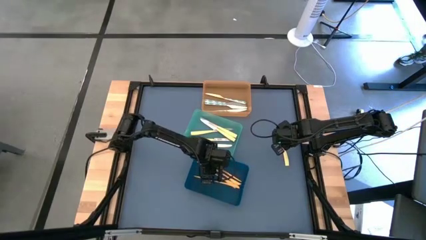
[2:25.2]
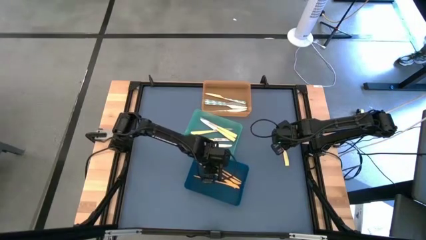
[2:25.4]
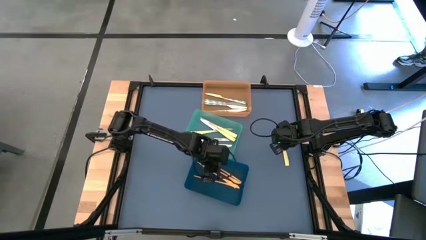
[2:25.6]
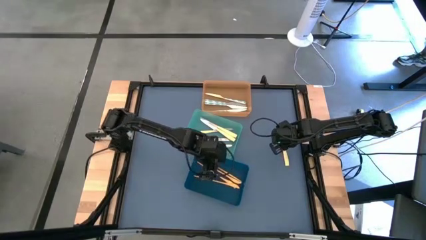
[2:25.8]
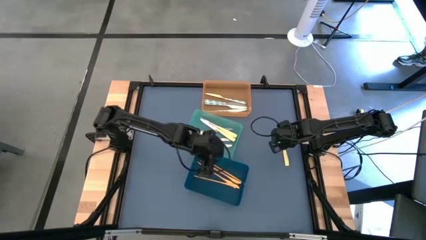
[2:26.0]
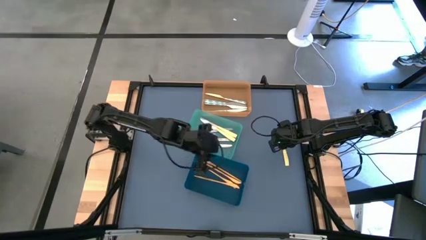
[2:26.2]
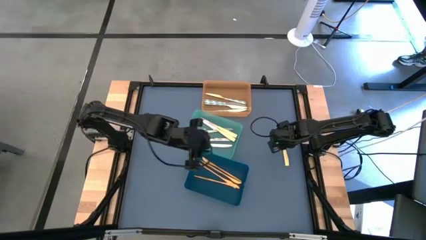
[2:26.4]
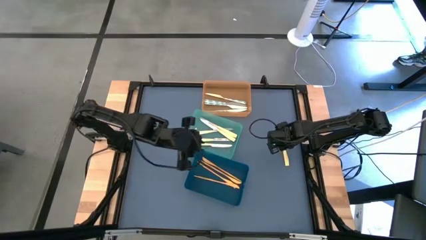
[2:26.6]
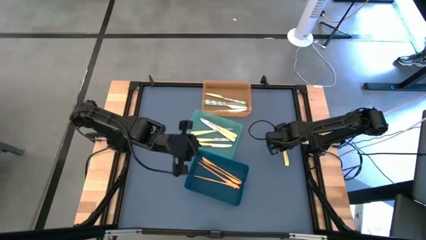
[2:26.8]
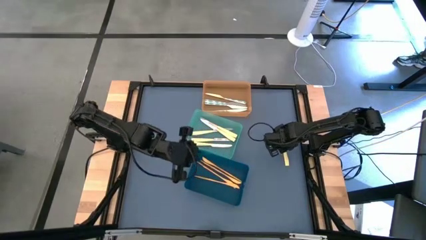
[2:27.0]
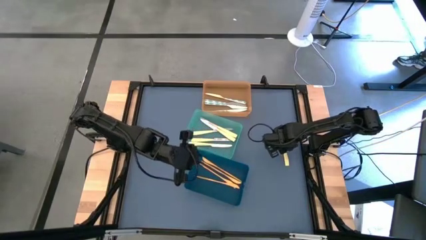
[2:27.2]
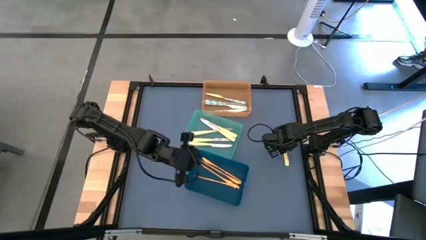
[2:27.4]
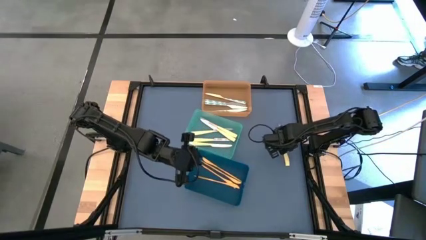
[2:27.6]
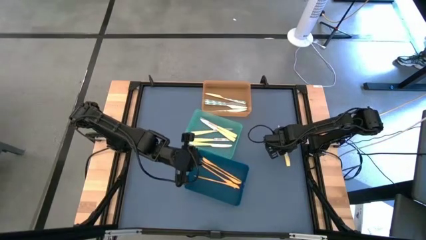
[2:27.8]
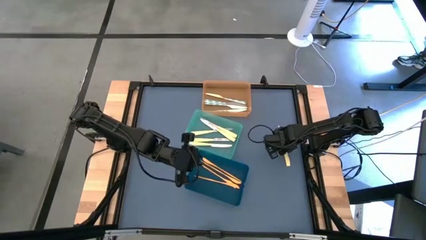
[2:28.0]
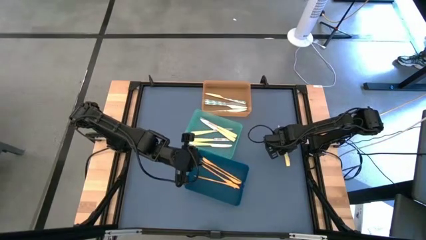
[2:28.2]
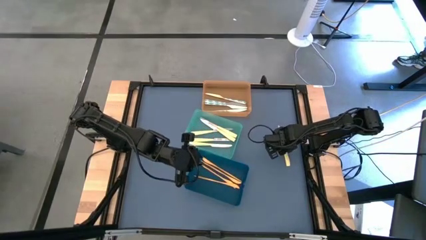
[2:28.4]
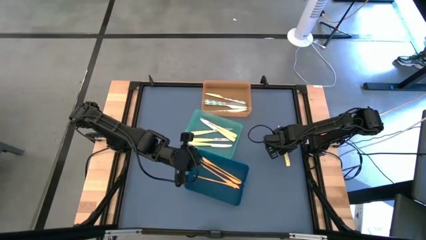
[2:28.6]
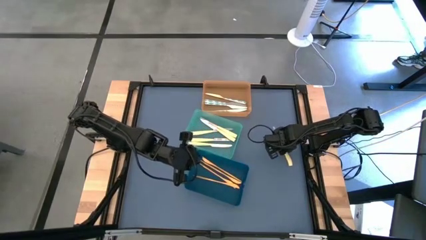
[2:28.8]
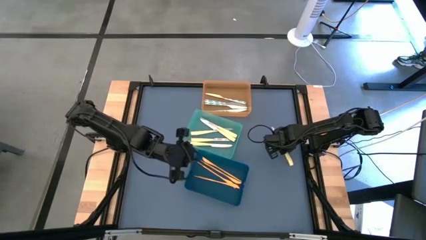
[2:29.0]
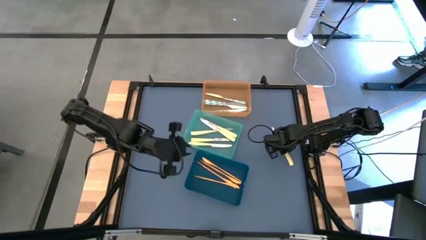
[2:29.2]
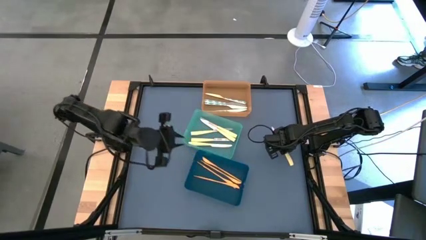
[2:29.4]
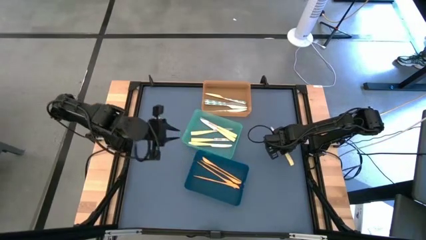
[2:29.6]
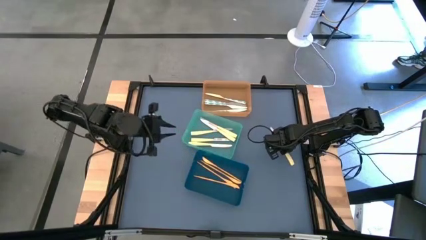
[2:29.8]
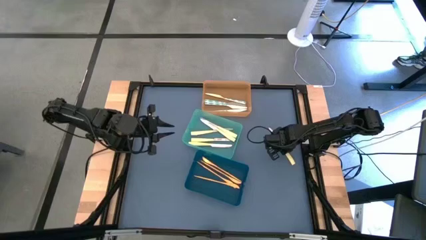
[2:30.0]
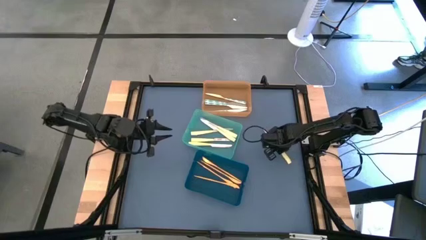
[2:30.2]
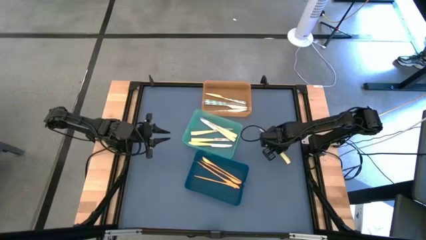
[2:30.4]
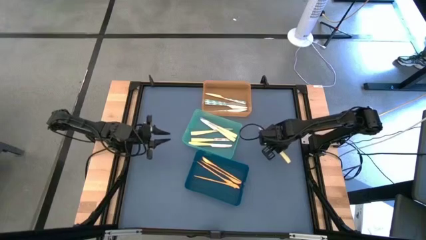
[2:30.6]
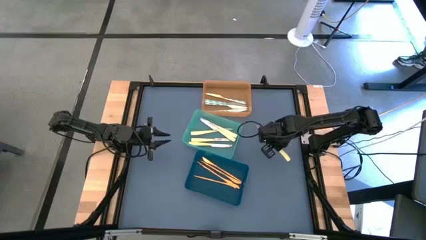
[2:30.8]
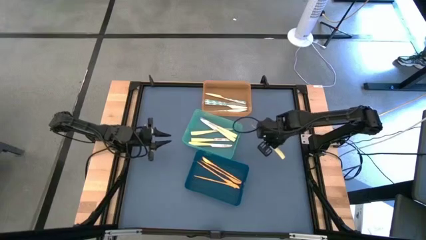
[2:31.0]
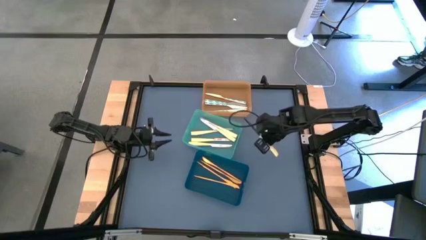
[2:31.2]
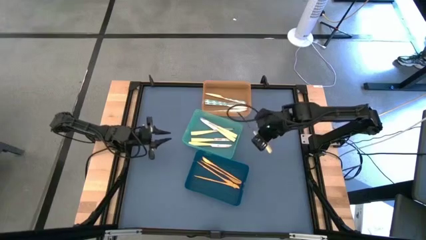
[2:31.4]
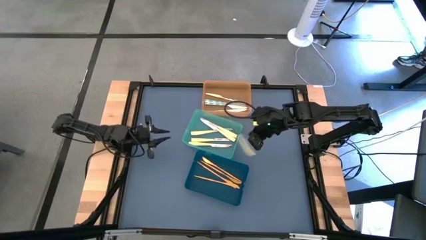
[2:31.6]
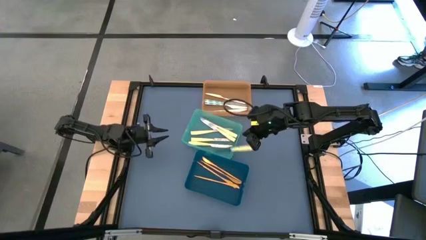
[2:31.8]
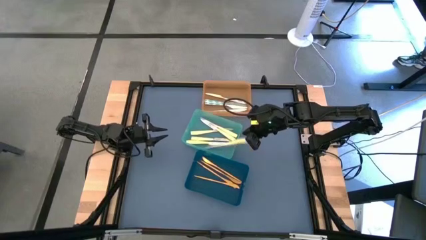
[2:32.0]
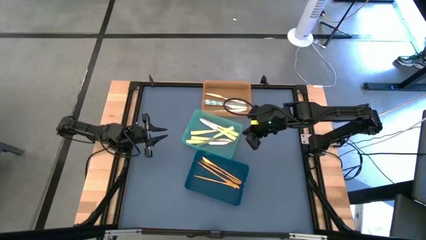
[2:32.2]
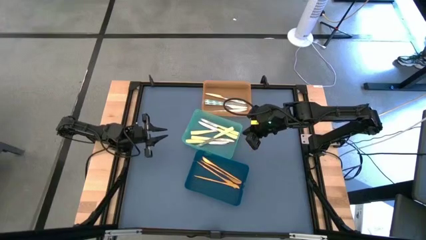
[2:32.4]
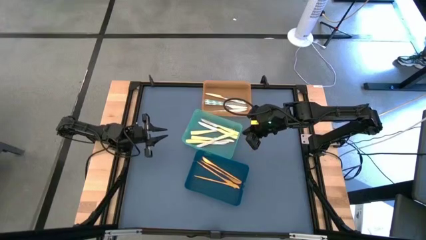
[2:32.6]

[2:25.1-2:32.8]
Task: Sort silverware by color (type)
Put the yellow knife into the green bin

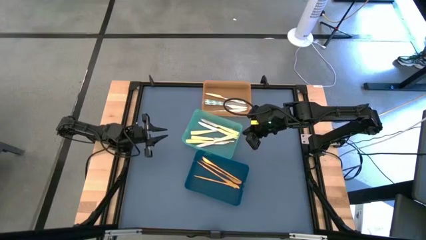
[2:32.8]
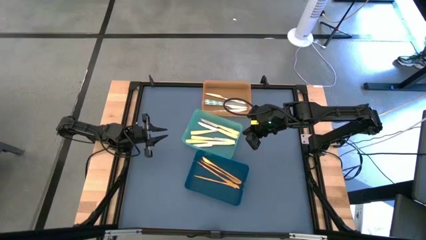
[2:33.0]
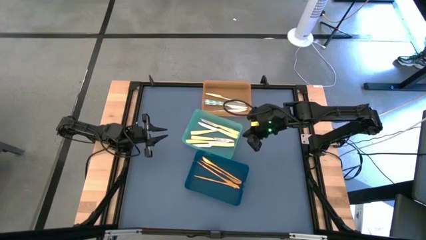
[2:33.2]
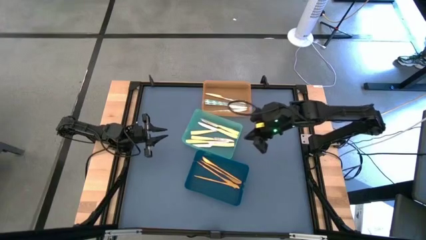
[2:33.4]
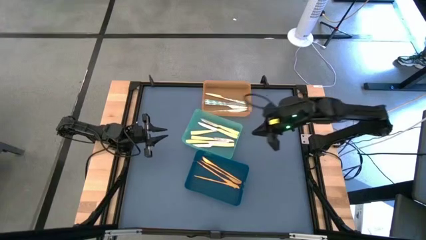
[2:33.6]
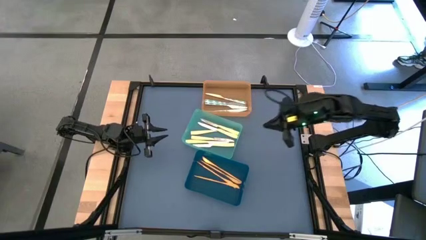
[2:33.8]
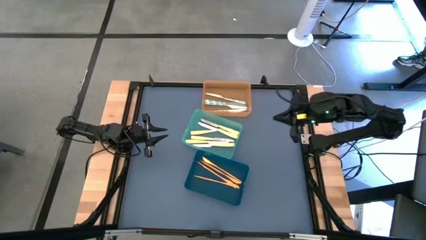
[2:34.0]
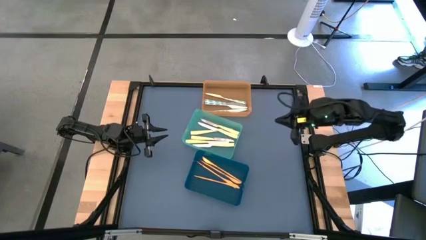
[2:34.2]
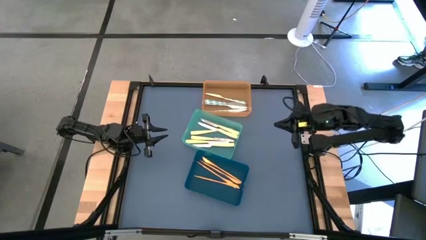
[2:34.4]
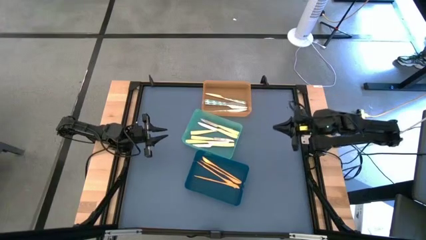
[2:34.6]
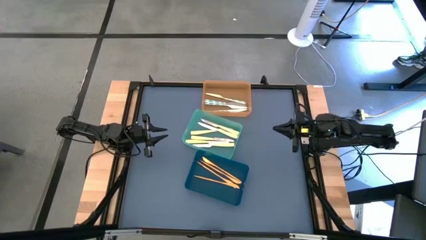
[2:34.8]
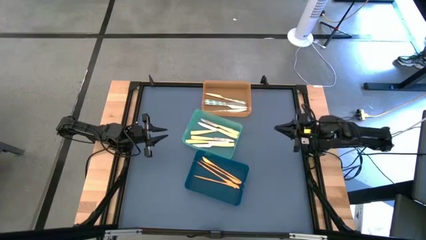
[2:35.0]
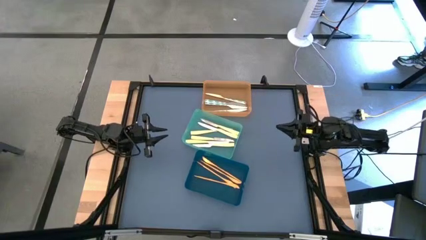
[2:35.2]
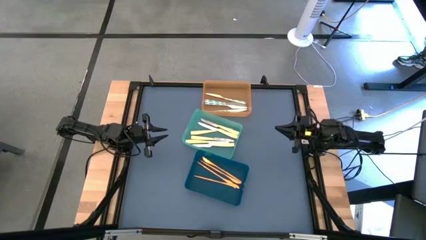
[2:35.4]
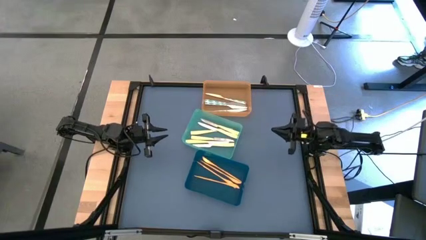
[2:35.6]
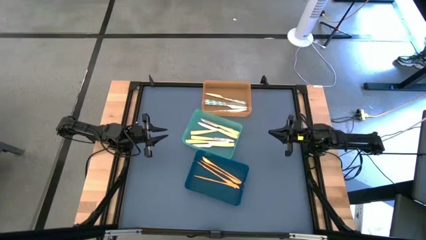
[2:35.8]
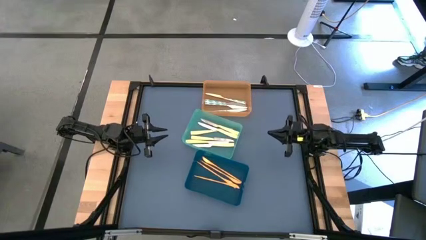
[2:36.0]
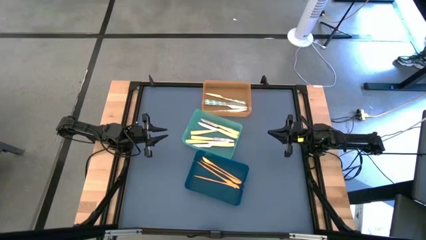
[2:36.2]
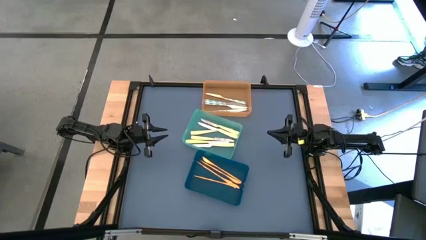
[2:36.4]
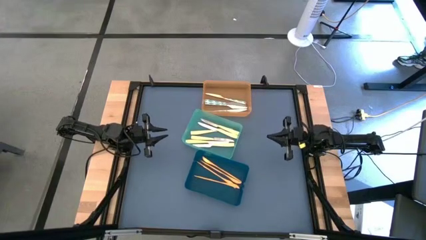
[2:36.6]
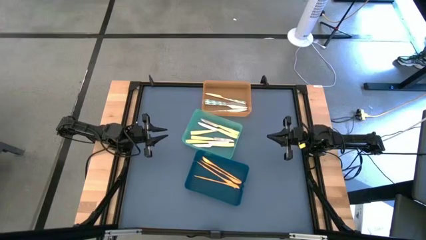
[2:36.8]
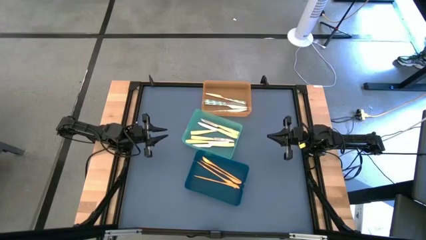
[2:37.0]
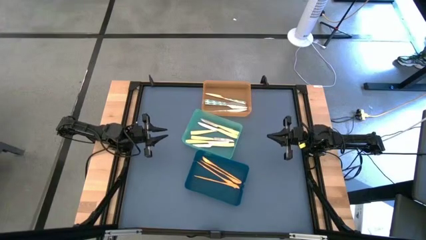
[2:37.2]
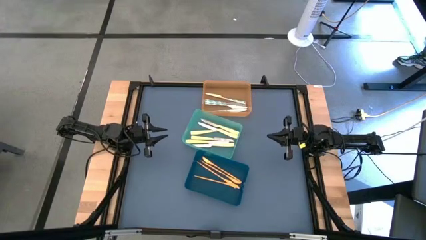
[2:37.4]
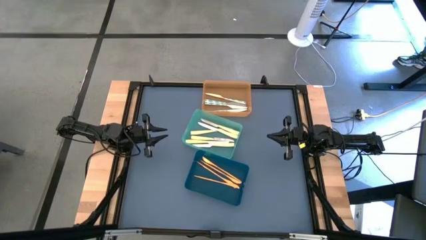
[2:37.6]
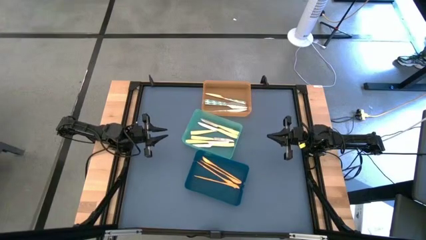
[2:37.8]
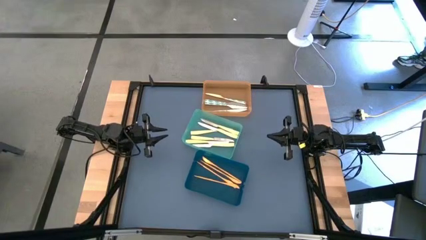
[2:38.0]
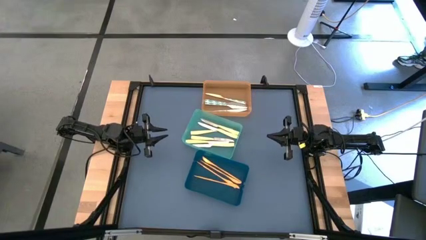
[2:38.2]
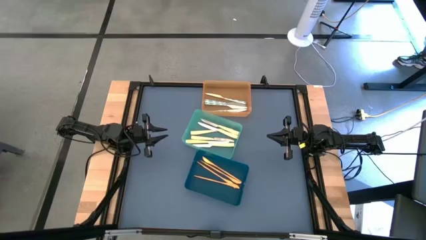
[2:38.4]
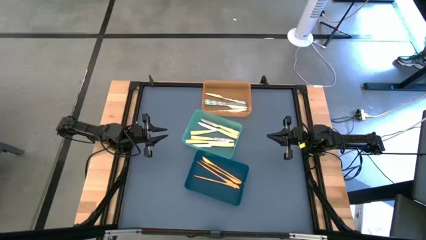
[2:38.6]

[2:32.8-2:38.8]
Return to Home Position

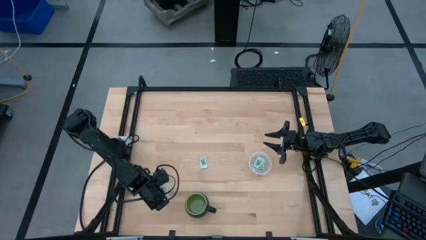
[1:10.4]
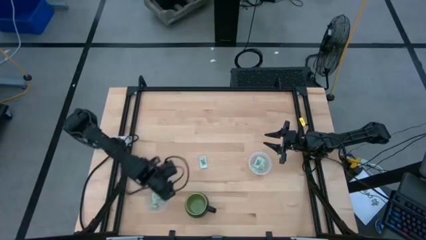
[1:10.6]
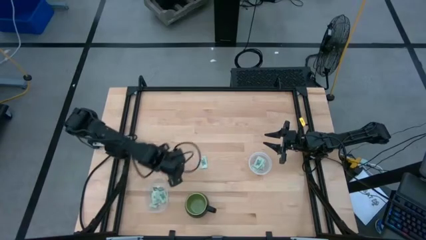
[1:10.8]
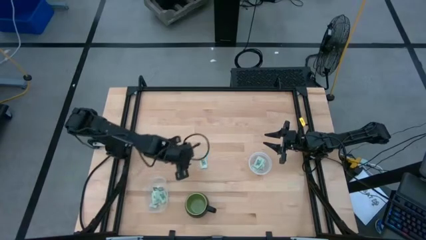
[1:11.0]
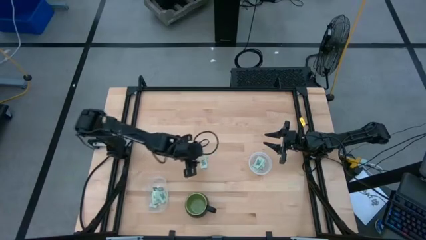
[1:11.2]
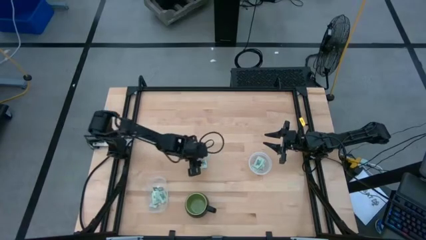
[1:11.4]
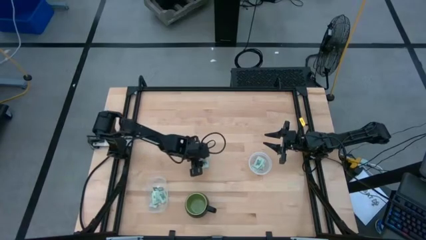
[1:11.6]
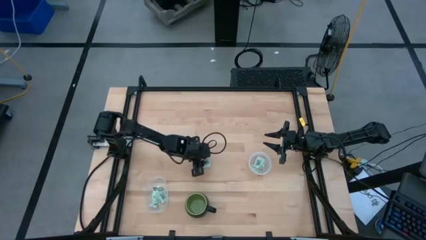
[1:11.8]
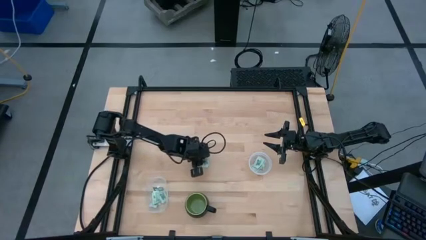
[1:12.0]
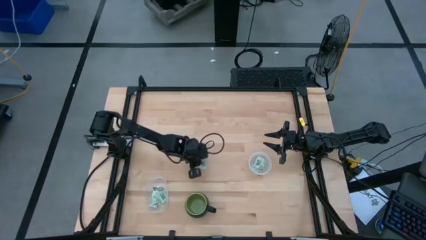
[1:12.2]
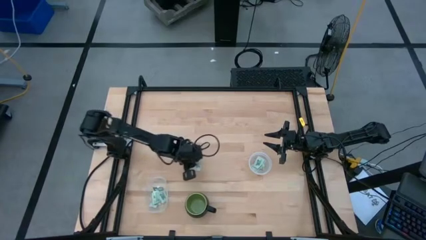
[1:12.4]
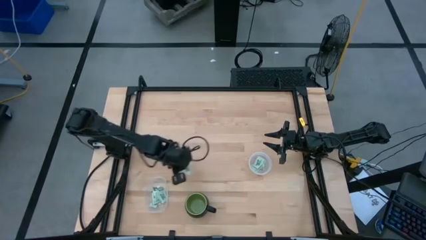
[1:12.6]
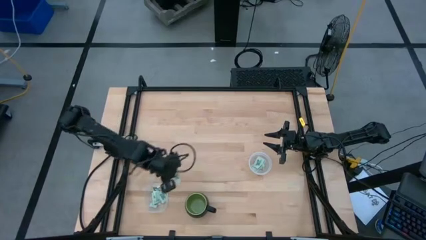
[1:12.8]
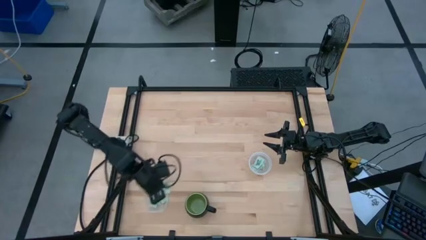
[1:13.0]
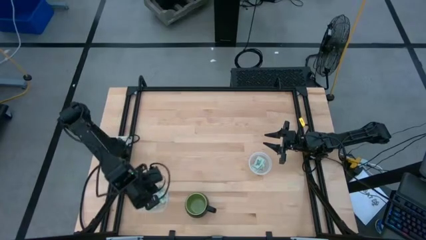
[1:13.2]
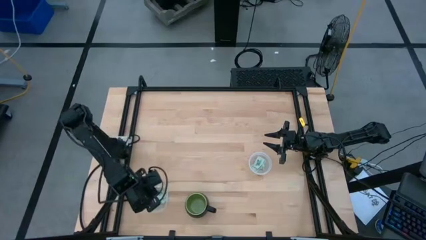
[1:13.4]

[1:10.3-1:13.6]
Task: Pick and place Stevia / Truvia into bins
Put the white stevia packet into the rectangular transparent container
